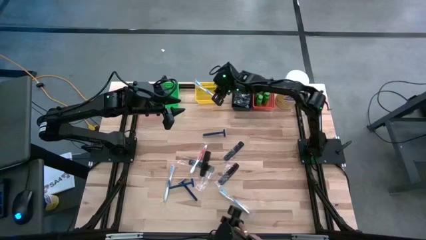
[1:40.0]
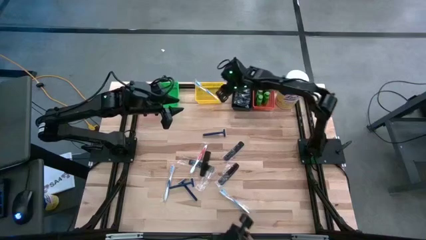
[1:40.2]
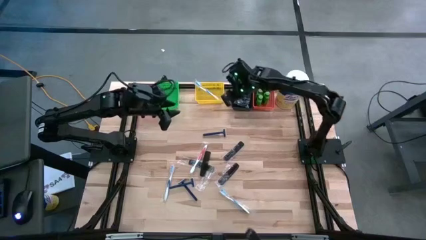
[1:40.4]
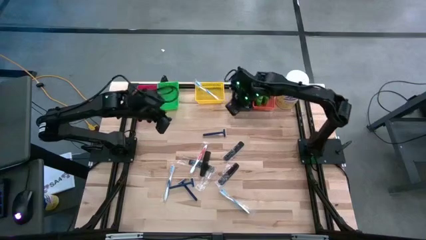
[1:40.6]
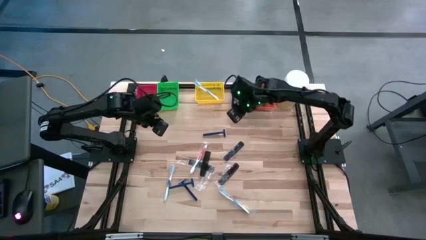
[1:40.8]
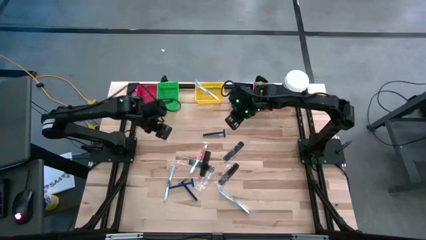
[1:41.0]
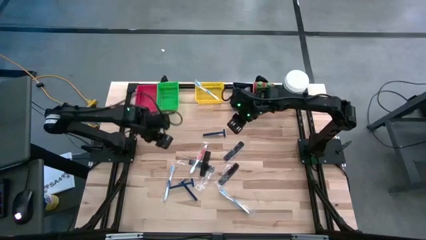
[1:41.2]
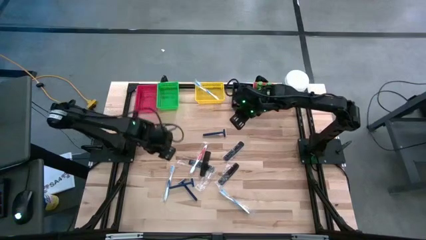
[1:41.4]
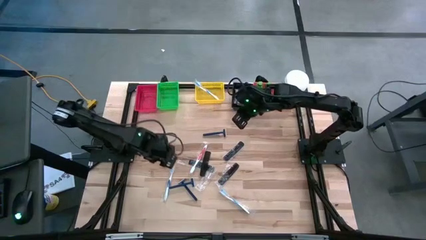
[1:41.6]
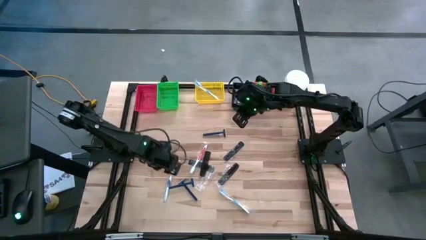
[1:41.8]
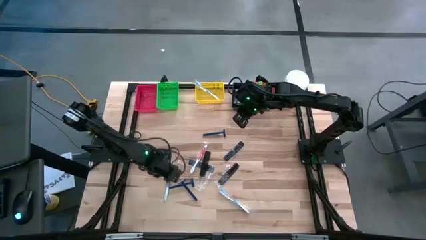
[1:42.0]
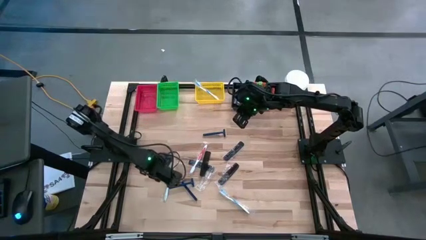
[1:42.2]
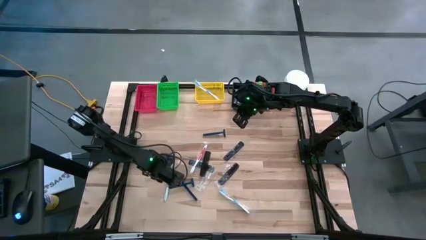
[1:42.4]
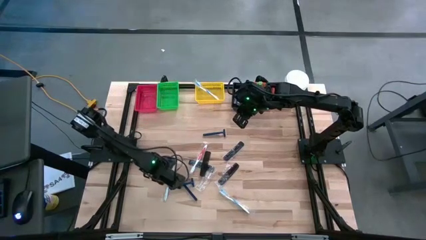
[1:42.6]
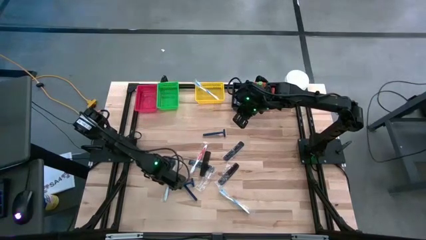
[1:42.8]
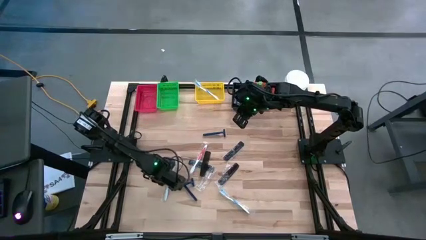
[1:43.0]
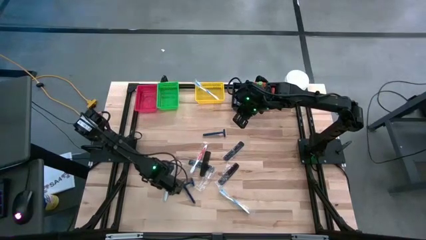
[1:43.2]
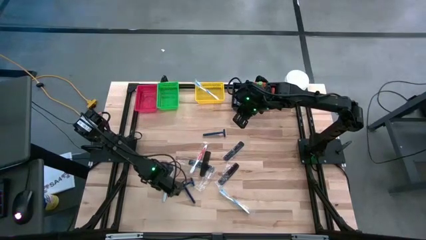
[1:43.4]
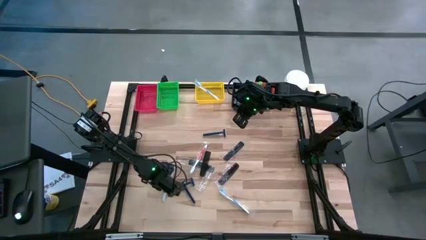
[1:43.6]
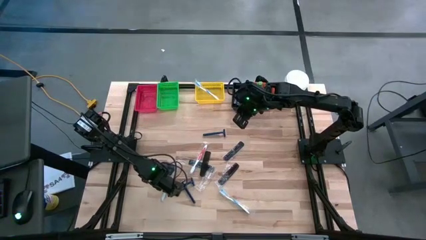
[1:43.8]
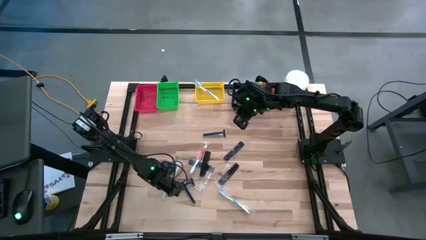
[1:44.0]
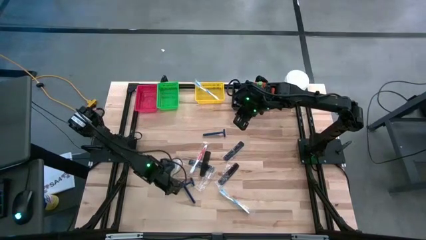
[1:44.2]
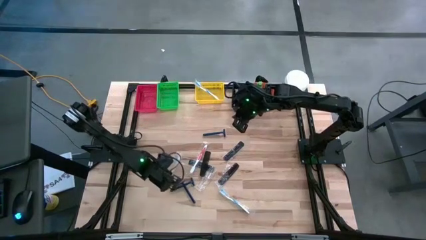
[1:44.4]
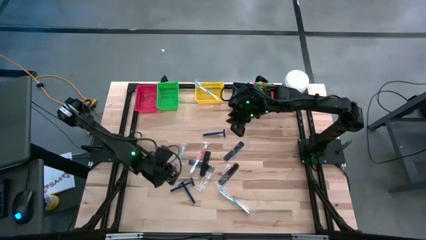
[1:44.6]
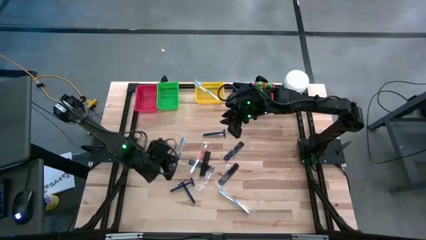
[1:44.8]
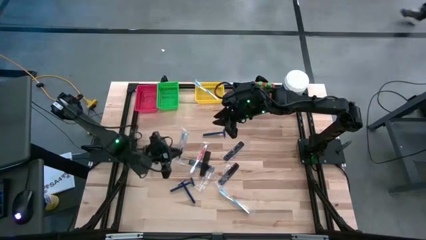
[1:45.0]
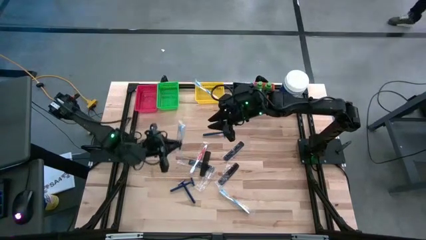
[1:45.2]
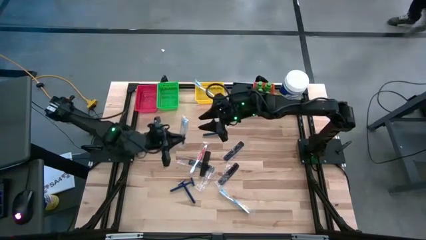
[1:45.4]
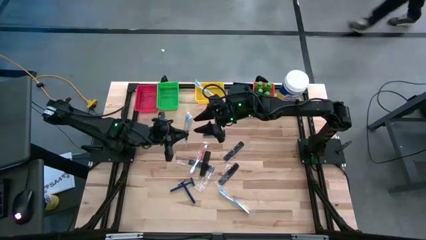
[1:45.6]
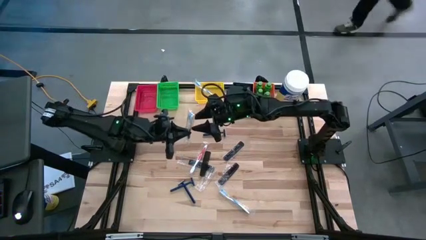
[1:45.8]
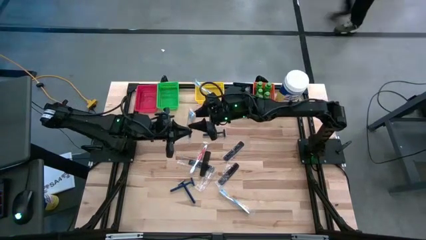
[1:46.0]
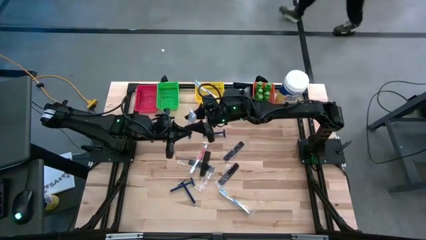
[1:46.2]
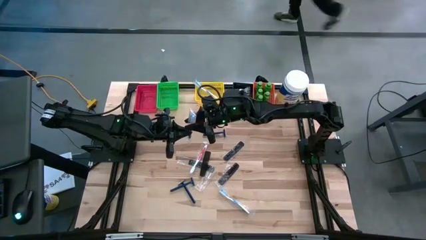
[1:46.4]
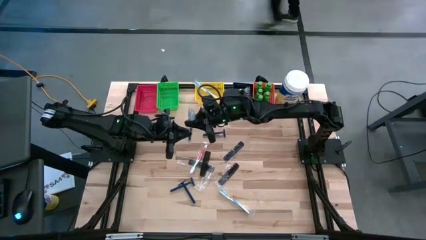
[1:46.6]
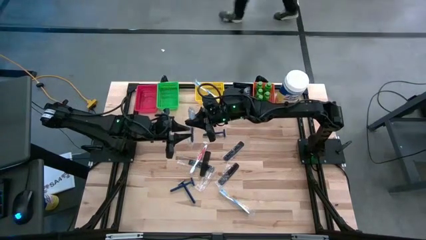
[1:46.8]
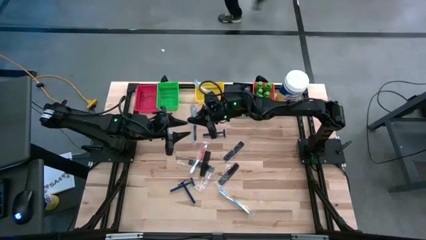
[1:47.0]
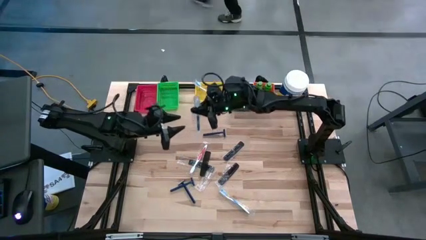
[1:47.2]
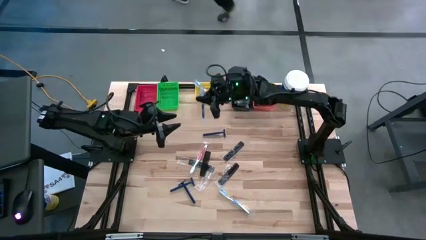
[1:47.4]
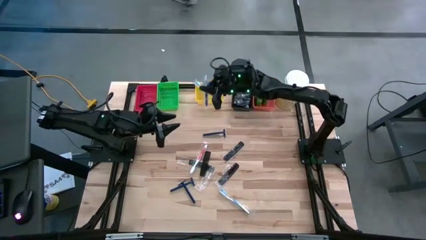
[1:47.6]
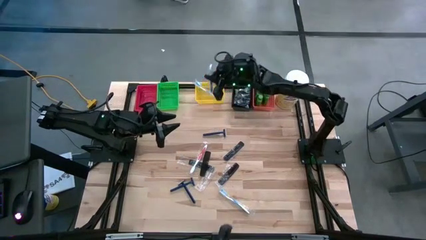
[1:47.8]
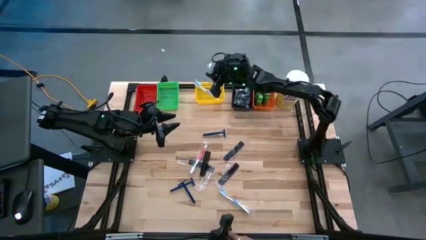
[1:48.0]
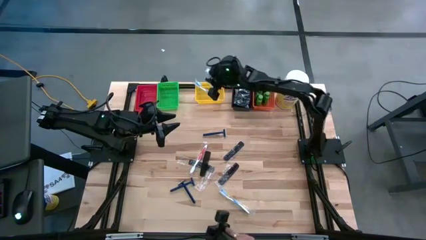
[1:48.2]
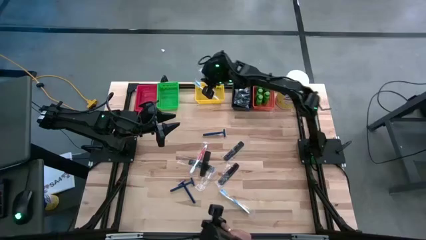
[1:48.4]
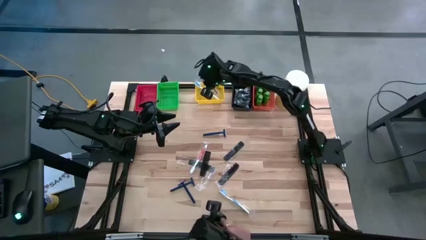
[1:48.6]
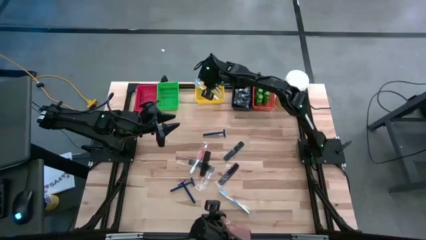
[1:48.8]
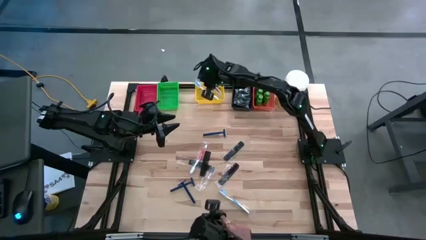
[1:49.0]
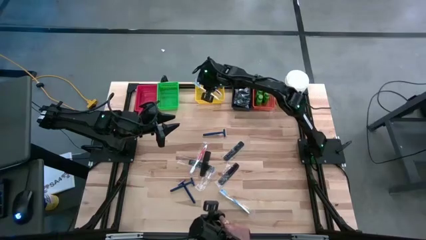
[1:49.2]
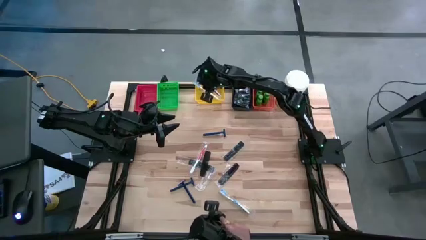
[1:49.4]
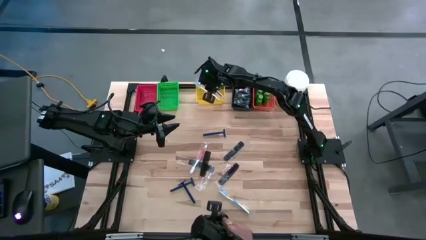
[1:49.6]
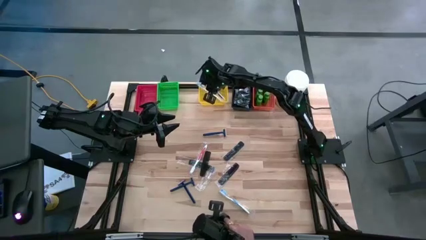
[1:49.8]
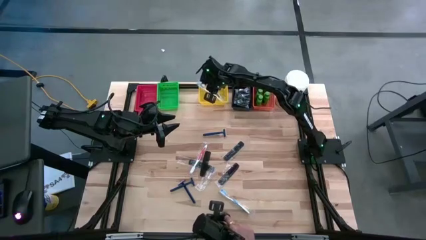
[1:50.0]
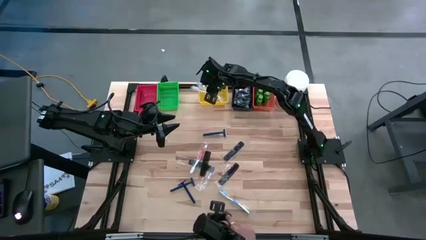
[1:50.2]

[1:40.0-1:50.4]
Task: Pick & Place Travel size toiletries
Put the dark blue toothbrush into the yellow bin

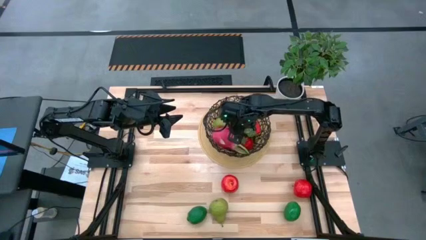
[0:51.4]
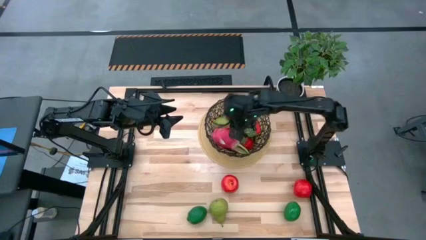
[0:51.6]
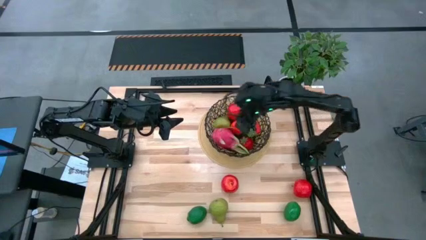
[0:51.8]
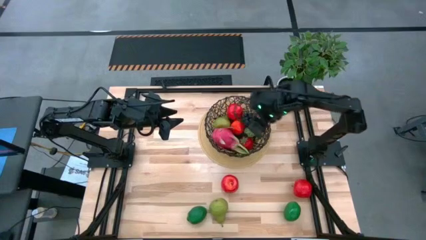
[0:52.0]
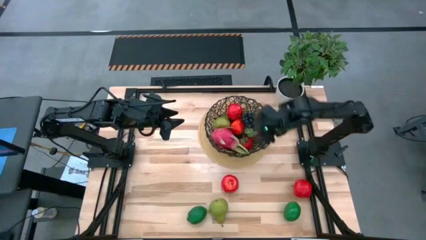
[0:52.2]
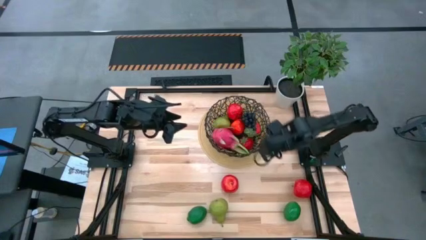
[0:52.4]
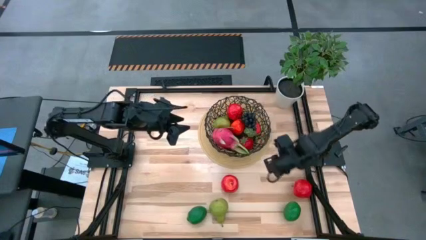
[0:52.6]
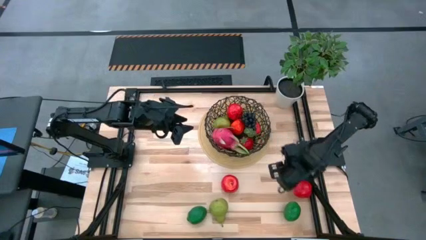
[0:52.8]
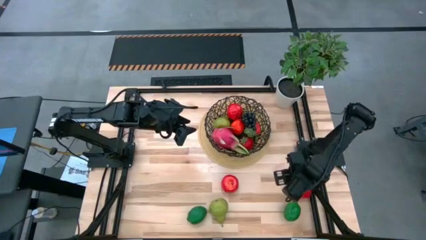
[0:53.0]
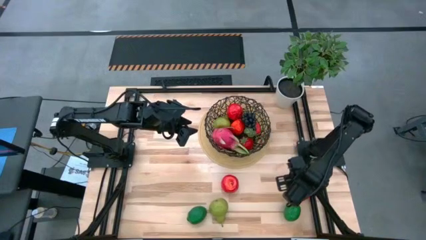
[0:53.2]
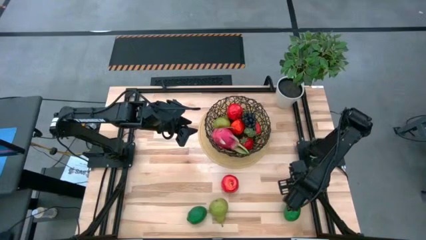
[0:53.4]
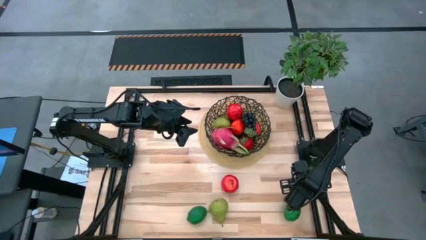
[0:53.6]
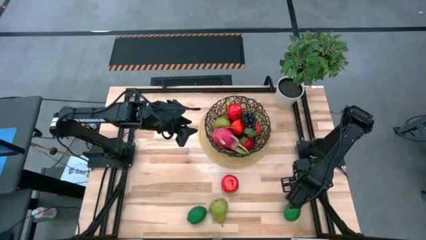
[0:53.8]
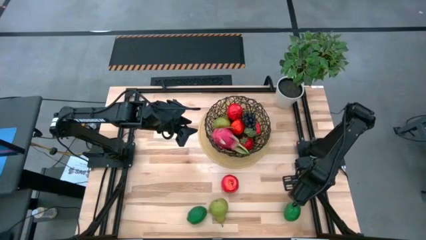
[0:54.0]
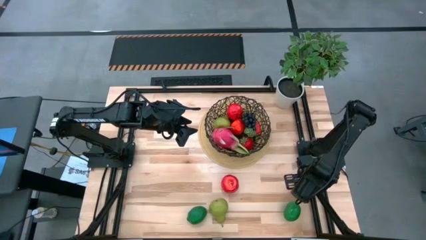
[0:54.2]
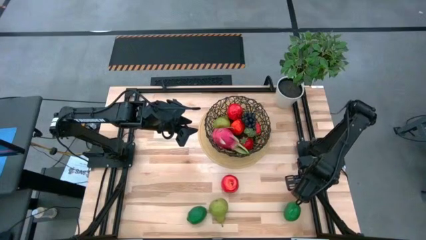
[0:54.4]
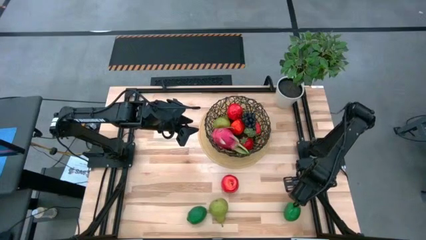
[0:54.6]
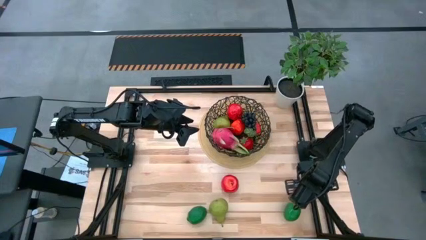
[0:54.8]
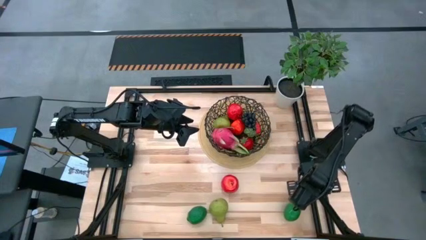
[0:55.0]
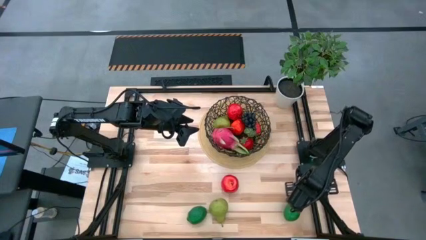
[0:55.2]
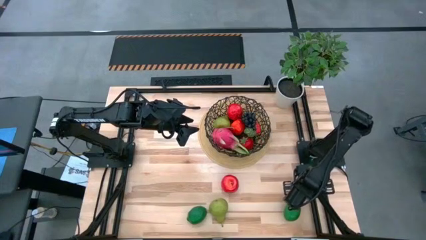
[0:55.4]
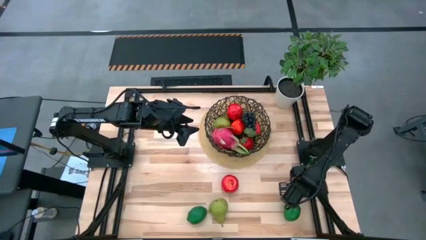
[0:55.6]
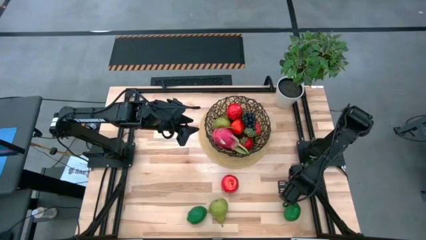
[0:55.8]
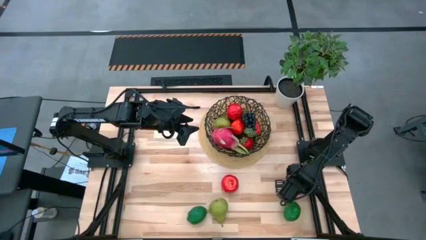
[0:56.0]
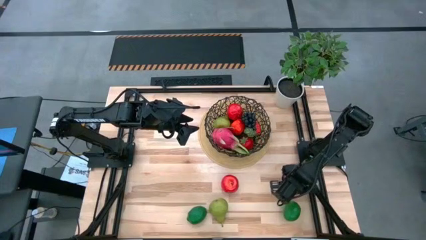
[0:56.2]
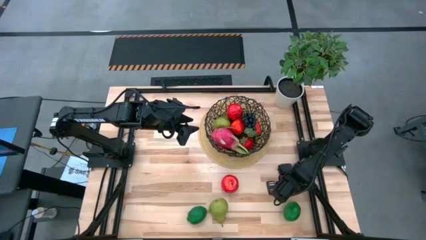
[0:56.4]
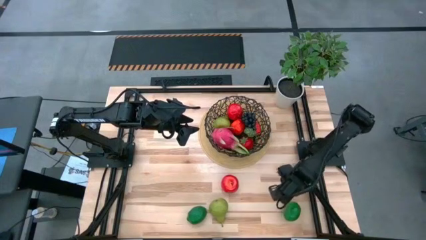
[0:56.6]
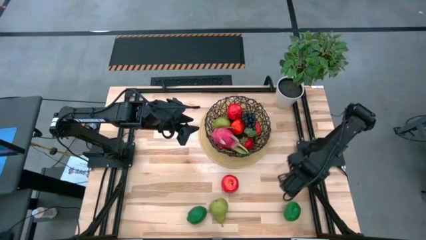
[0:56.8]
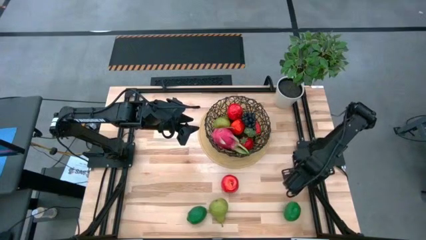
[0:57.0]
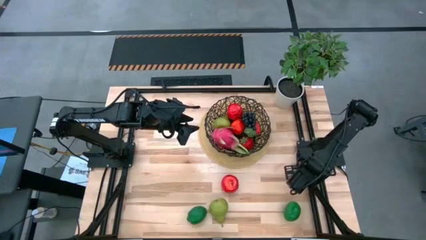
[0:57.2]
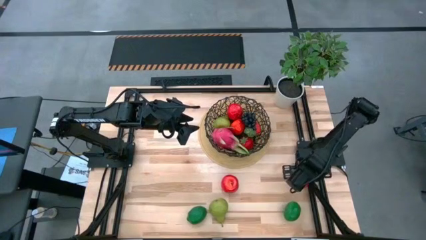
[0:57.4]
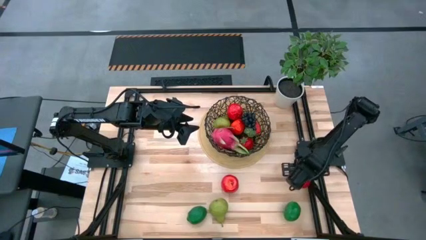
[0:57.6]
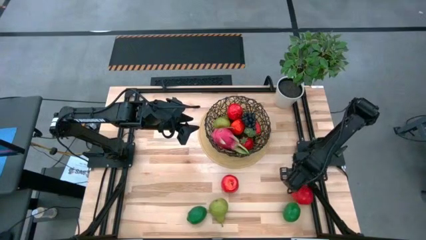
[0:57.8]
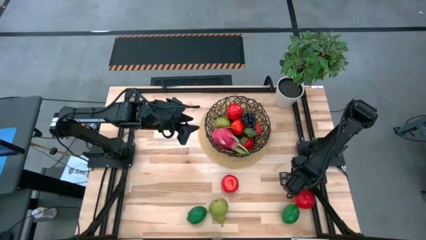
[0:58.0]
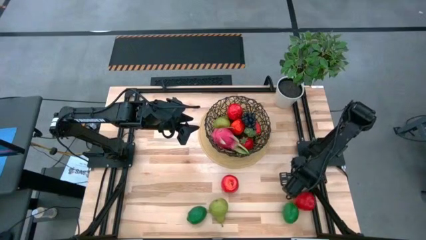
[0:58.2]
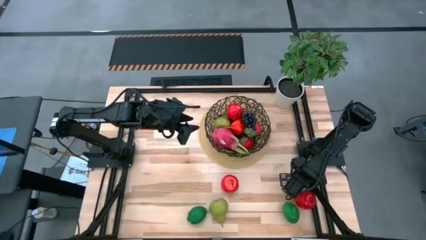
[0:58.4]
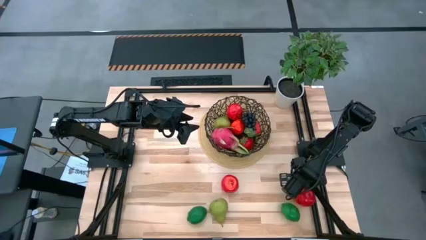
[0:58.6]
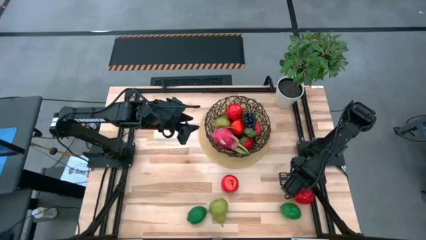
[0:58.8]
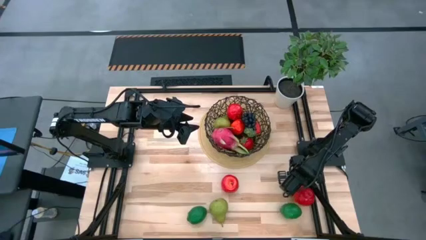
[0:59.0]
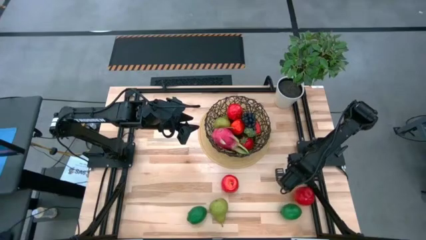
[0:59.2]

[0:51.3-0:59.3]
Task: Build produce basket
Put the red apple into the black basket
